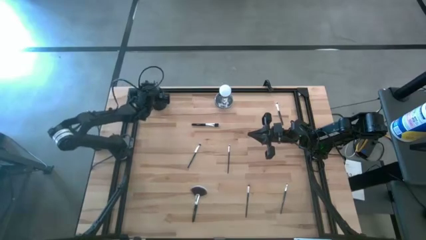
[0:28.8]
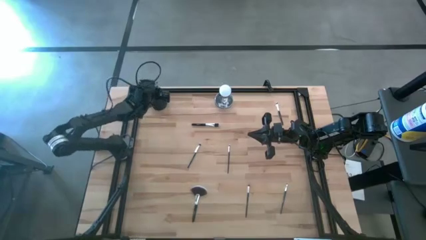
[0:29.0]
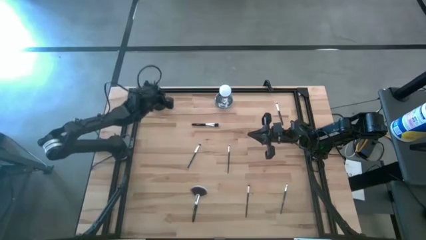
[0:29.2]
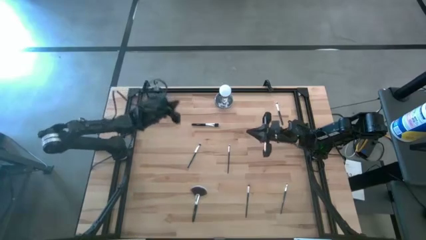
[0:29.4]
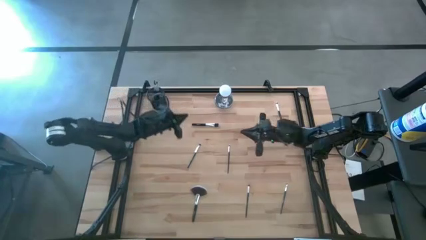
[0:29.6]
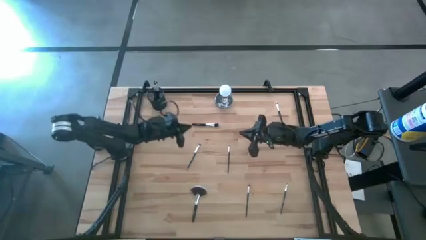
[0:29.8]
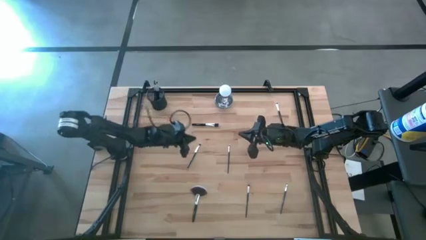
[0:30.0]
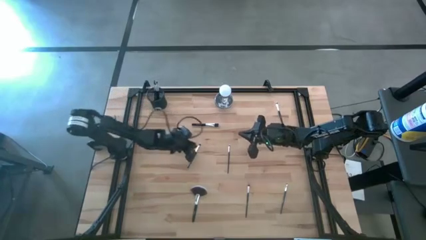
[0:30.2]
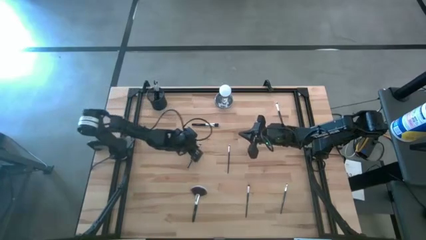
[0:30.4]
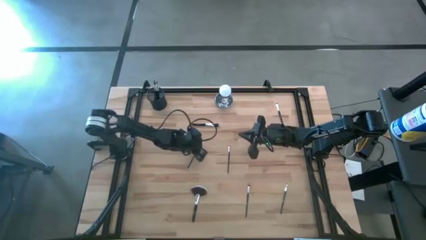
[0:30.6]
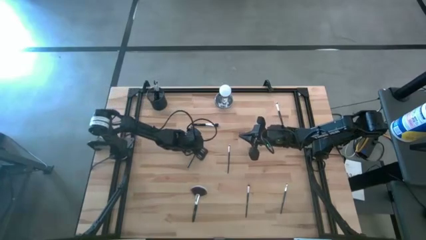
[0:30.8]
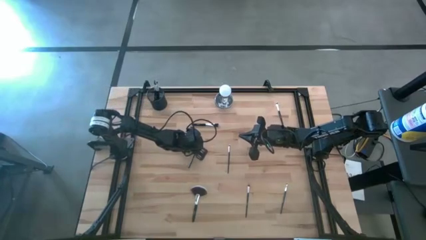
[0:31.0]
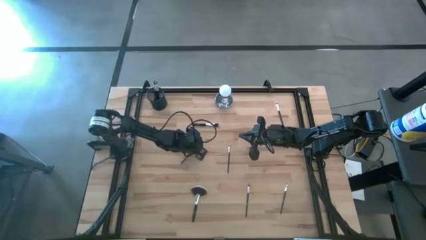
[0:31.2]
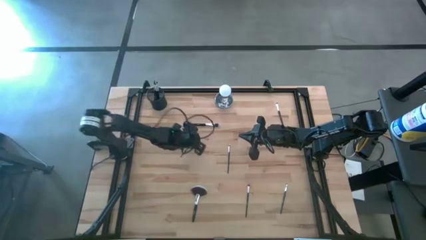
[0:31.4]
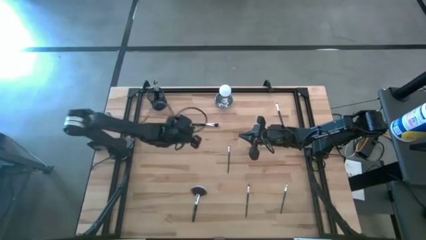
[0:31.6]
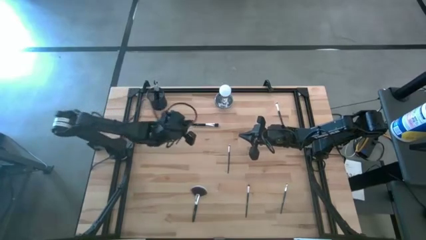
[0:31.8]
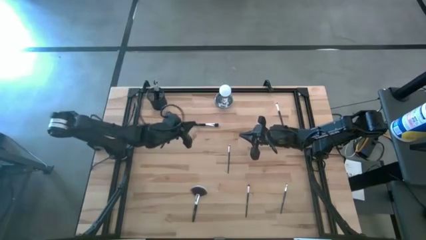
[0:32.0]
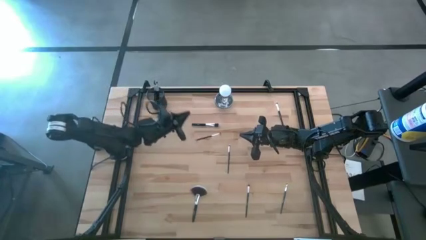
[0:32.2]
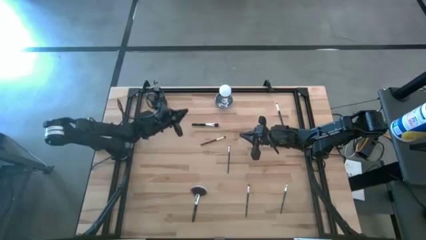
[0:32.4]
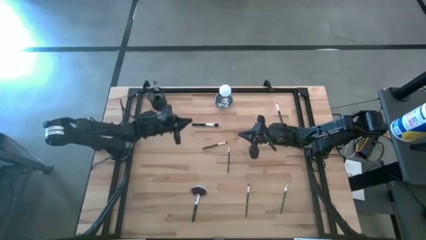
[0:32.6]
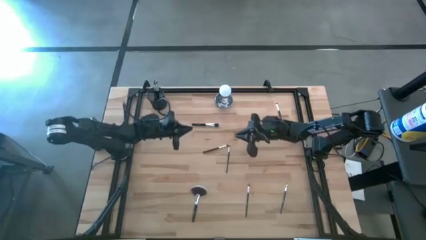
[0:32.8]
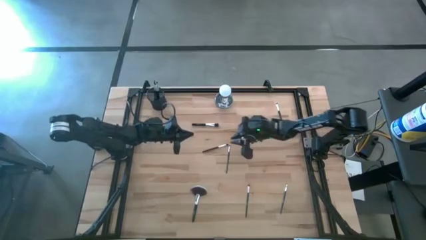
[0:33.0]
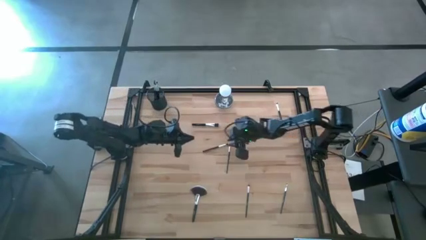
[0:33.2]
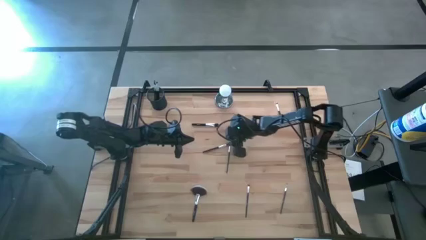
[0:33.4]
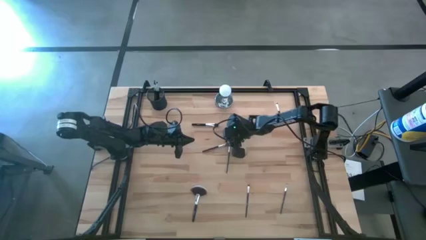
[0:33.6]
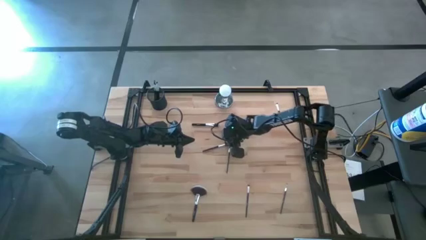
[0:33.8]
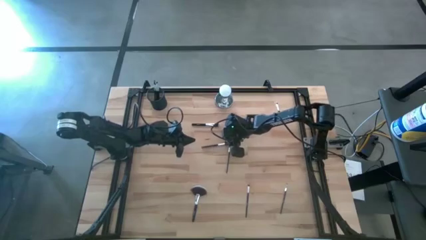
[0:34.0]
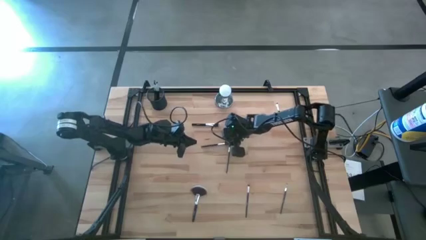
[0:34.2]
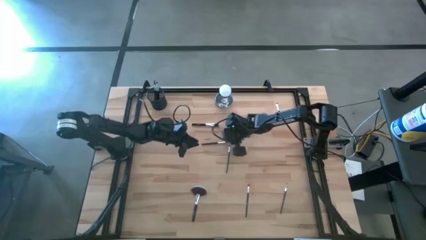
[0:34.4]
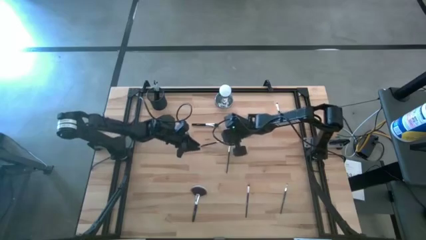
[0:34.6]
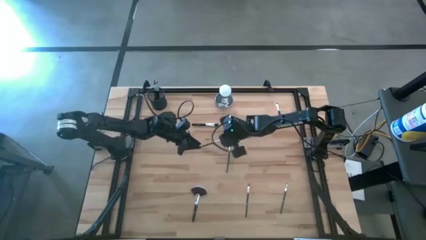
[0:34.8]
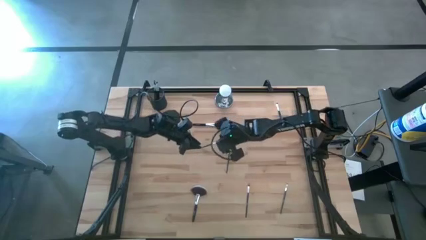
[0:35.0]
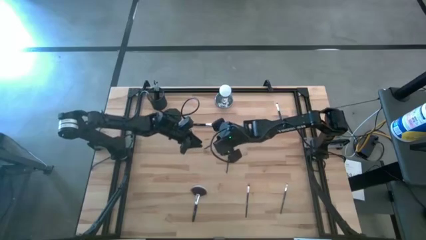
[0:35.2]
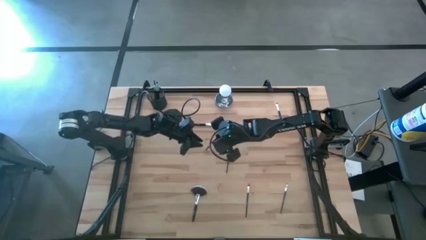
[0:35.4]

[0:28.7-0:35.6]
Task: Put items in baskets/containers
Put the black blush brush into the black brush holder

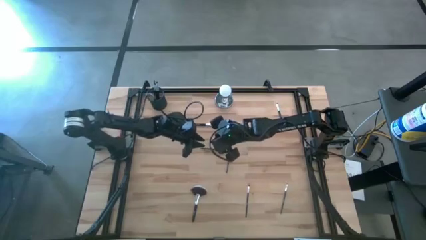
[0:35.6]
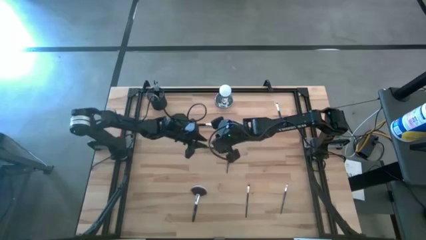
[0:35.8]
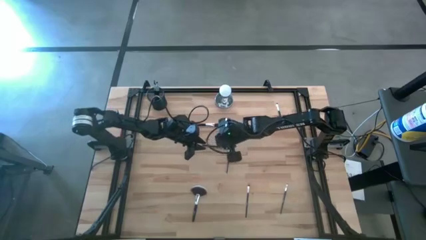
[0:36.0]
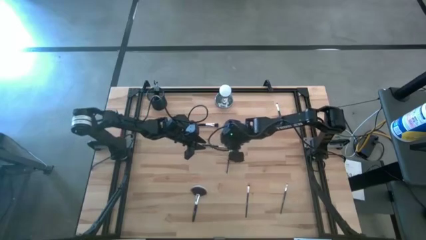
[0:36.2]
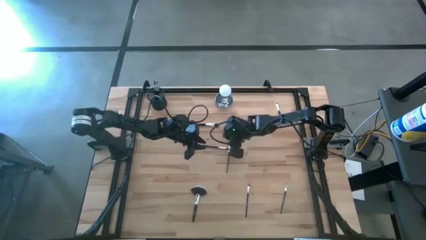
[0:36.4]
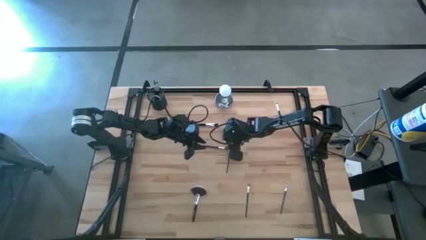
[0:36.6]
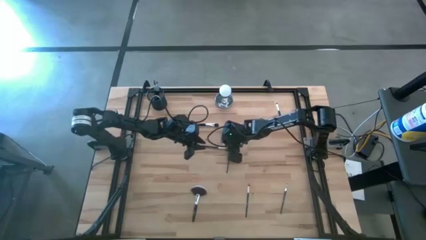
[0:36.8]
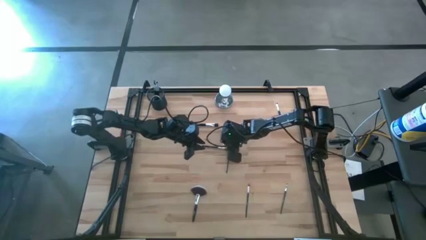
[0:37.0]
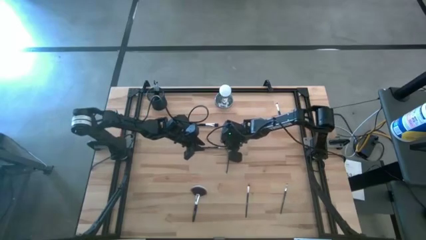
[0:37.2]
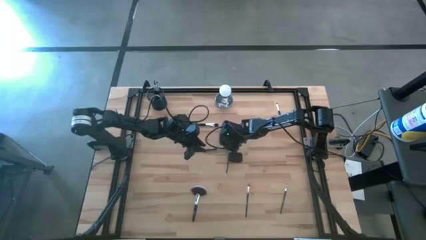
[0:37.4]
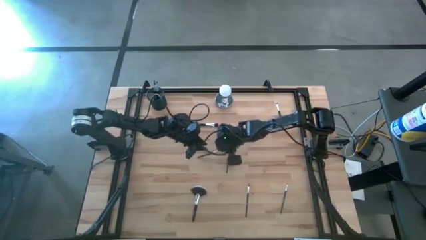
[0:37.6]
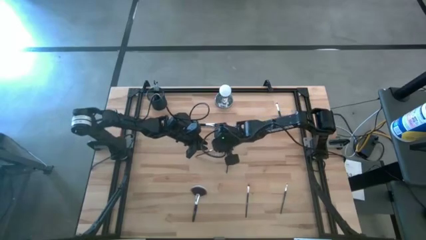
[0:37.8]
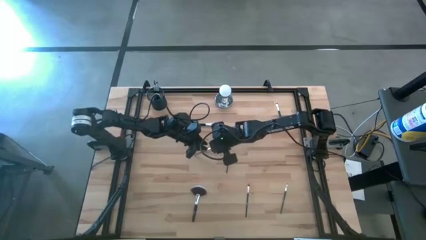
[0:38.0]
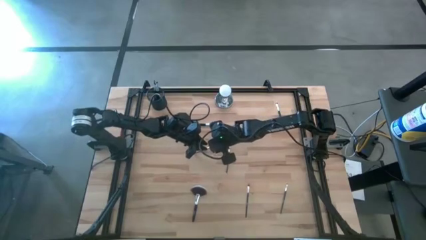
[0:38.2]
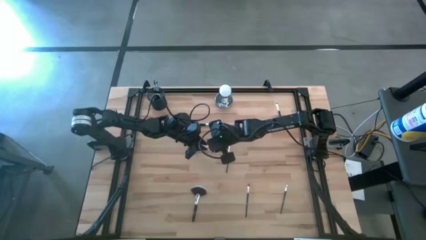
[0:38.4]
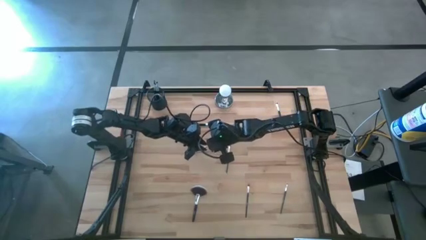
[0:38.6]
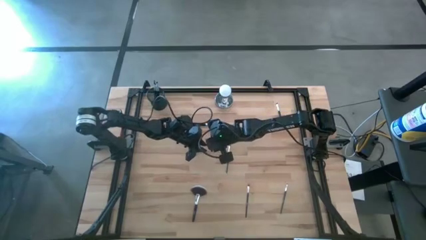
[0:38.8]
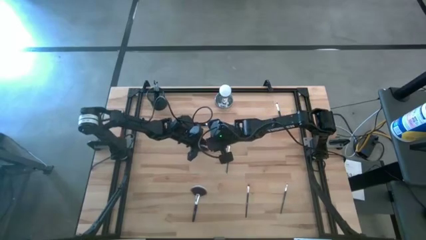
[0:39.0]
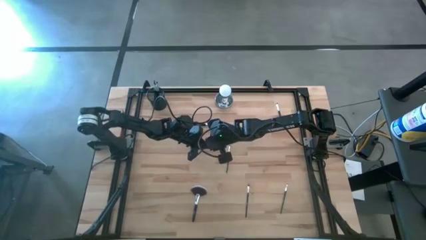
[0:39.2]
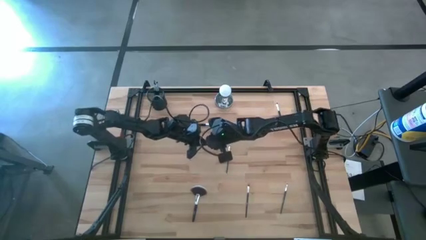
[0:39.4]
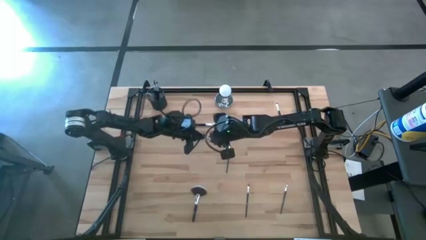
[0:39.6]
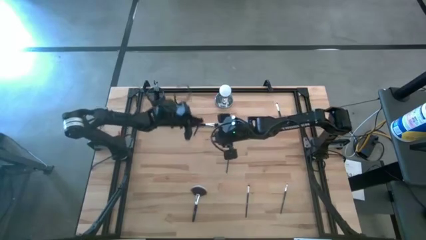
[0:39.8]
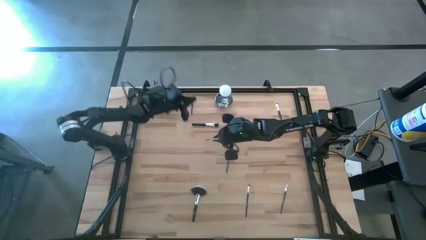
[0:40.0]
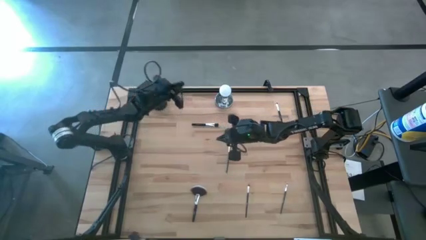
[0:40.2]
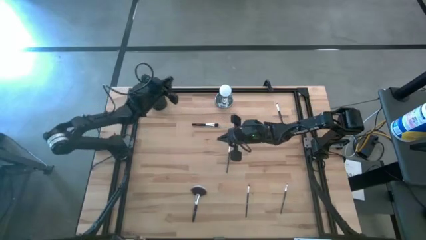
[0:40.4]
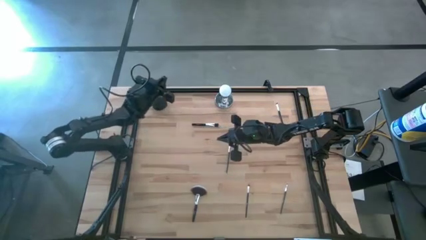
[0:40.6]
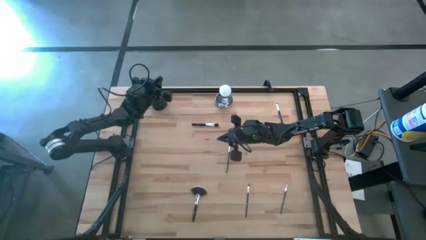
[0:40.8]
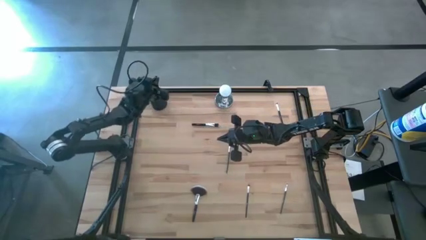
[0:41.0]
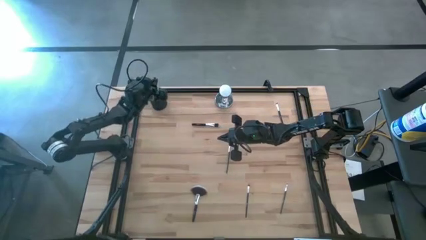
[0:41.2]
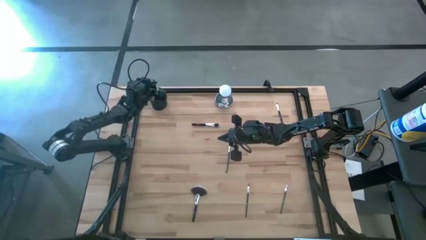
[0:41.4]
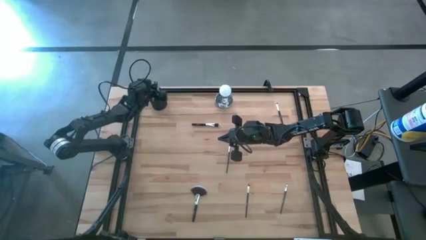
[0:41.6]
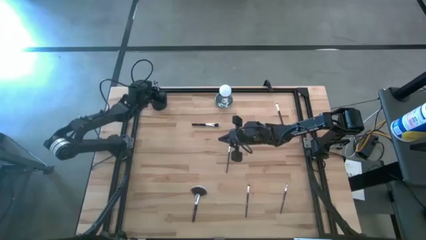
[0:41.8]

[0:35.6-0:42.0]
Put the black blush brush into the black brush holder

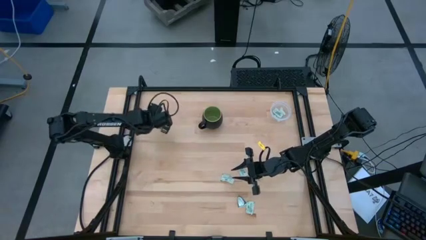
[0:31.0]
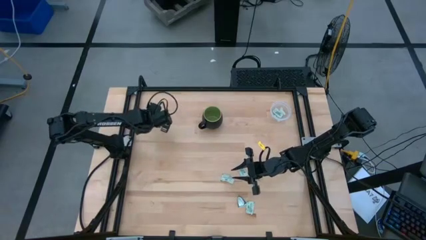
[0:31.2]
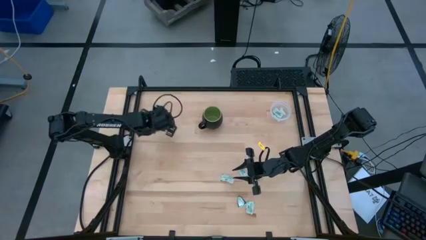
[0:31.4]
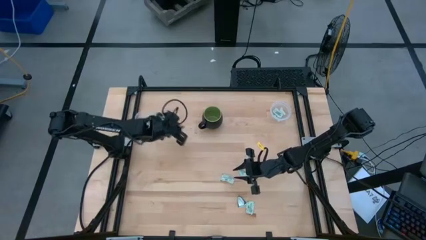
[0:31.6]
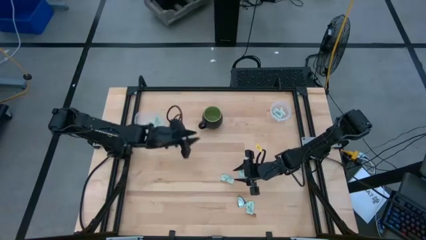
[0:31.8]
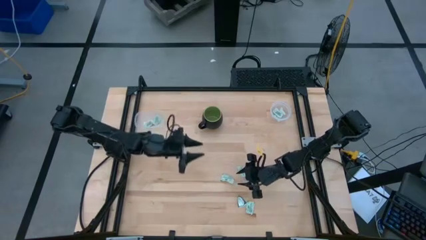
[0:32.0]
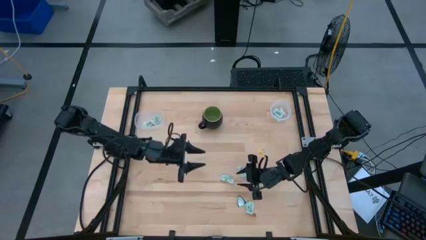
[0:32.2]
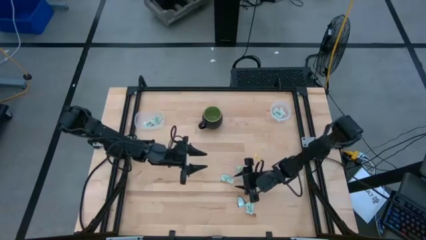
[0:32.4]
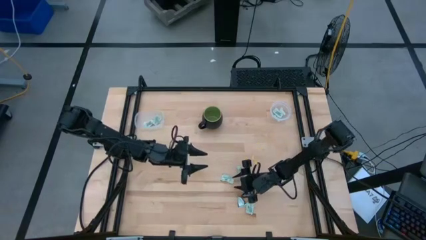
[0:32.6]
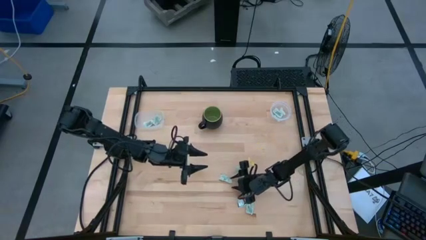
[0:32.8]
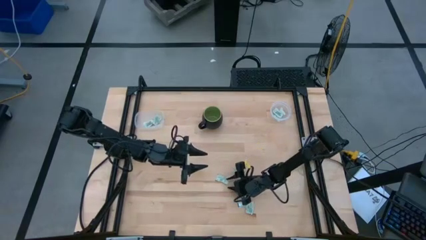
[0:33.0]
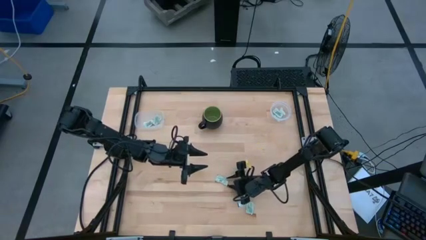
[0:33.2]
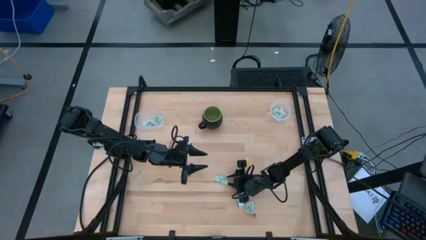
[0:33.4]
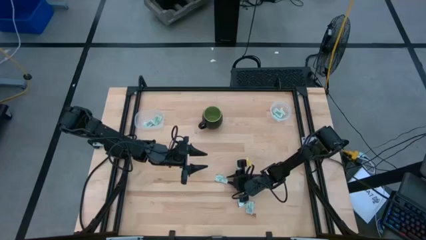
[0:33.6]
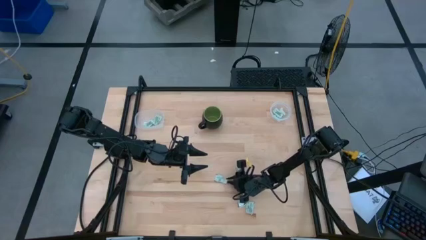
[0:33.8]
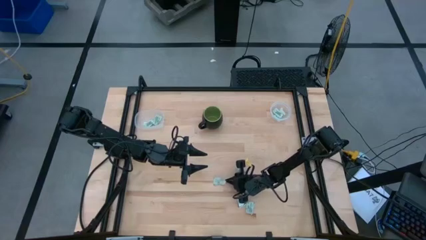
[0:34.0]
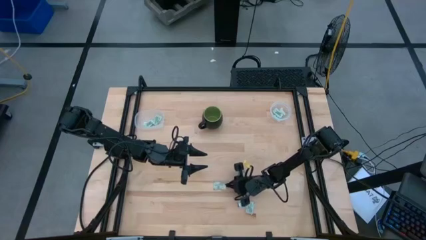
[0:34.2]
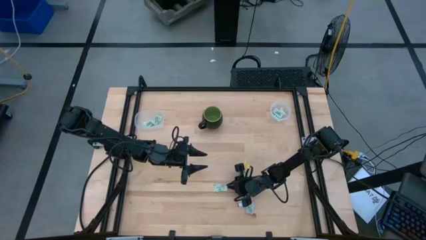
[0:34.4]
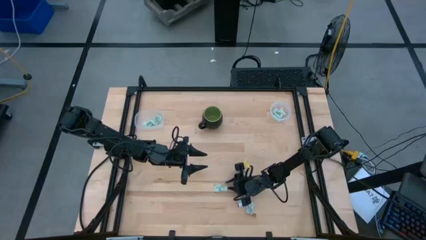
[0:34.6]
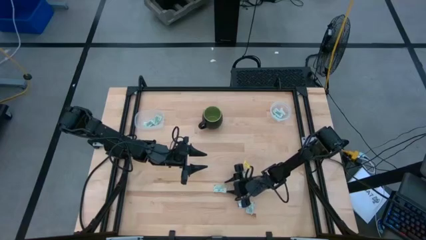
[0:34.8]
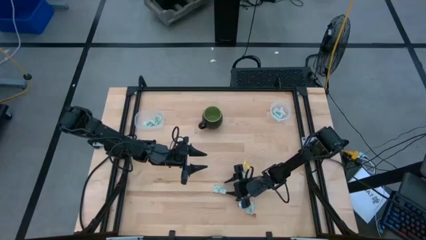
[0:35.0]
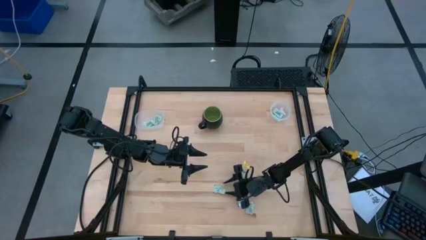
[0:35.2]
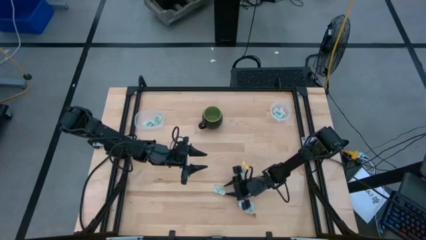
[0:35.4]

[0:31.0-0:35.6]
Task: Pick and place items into bin
Put the white stevia packet into the right transparent bin
